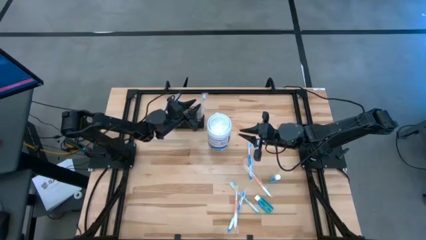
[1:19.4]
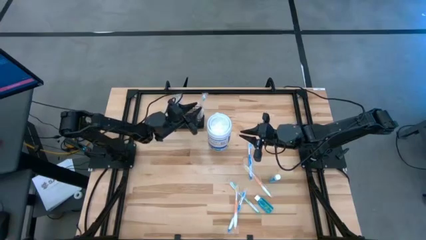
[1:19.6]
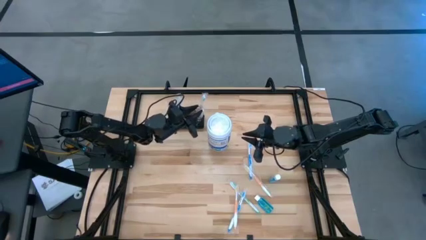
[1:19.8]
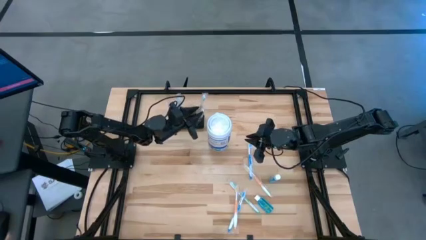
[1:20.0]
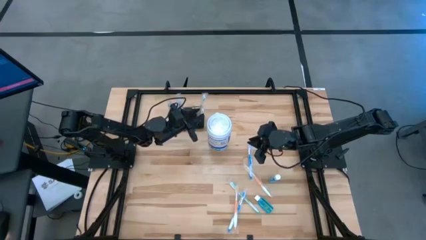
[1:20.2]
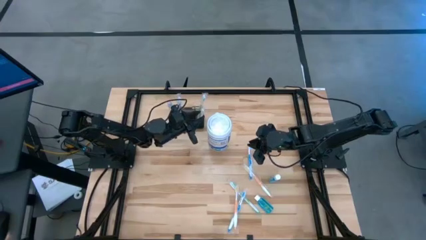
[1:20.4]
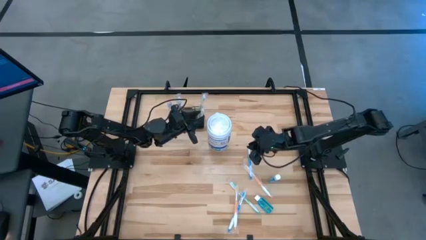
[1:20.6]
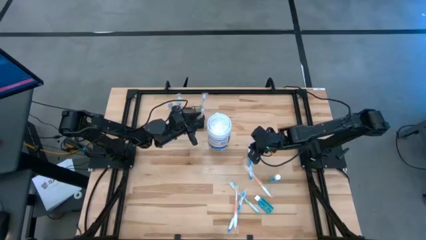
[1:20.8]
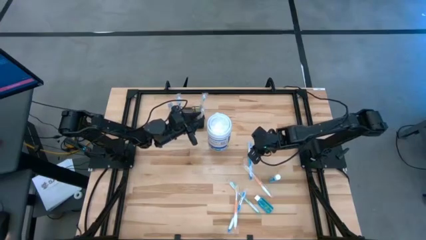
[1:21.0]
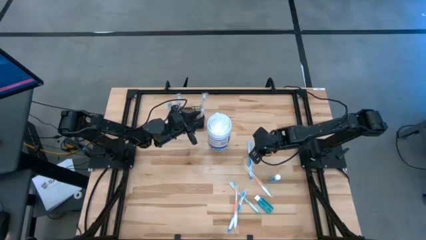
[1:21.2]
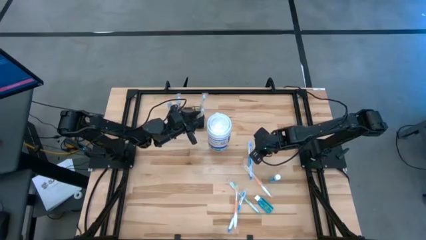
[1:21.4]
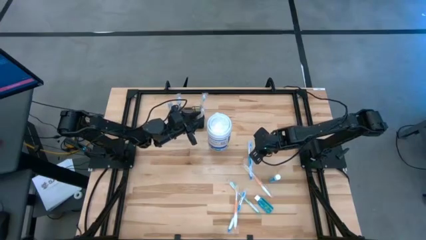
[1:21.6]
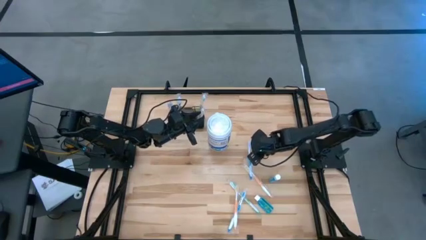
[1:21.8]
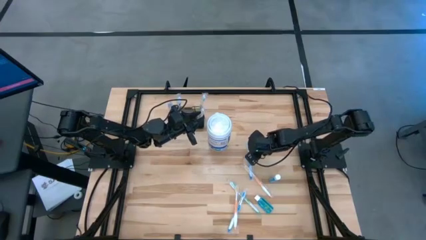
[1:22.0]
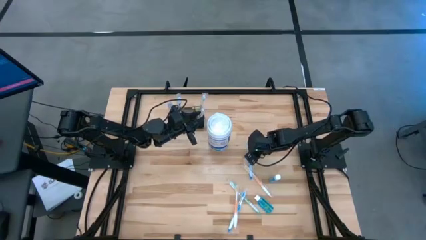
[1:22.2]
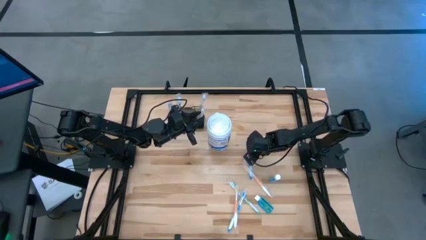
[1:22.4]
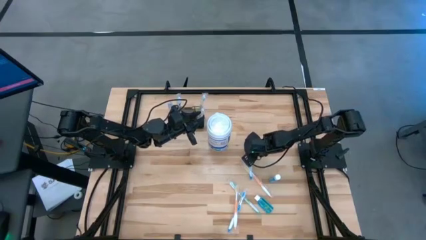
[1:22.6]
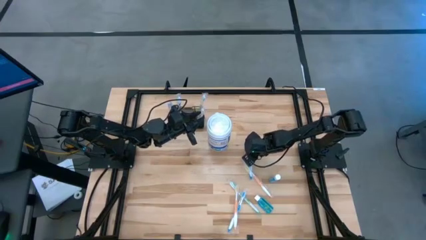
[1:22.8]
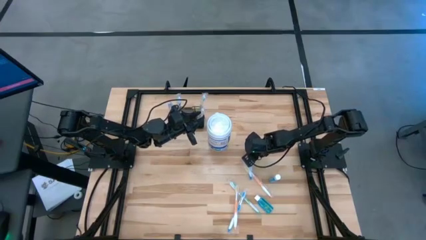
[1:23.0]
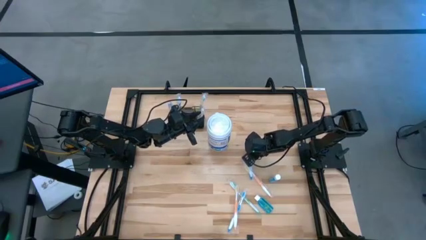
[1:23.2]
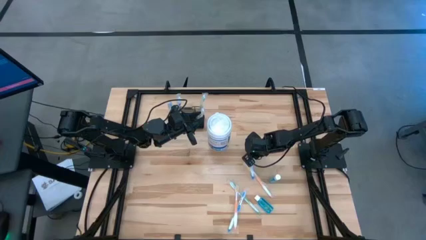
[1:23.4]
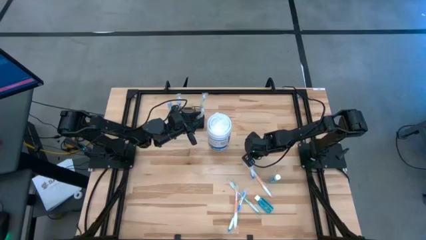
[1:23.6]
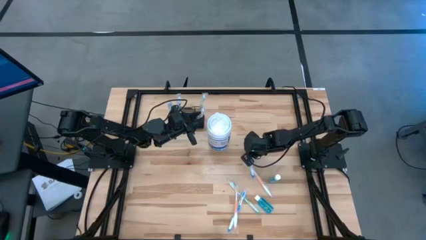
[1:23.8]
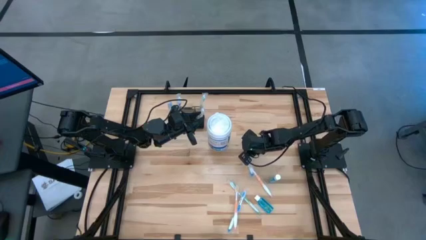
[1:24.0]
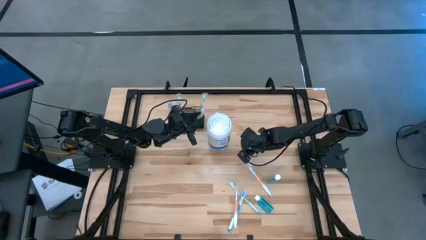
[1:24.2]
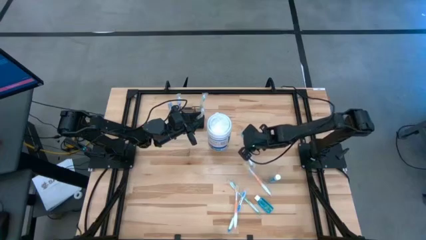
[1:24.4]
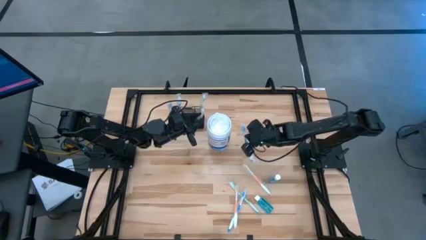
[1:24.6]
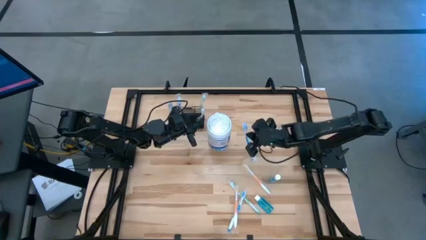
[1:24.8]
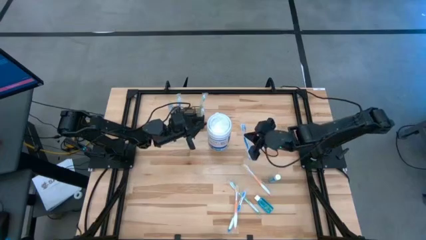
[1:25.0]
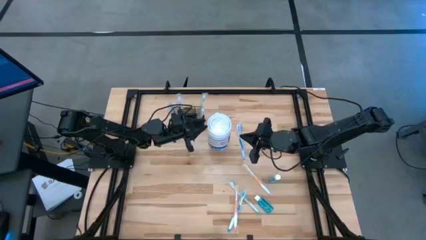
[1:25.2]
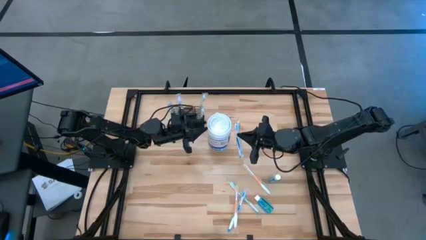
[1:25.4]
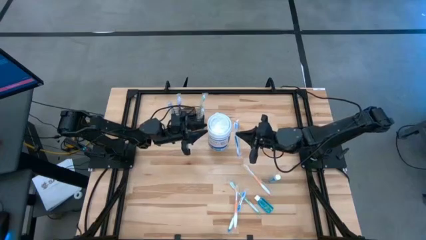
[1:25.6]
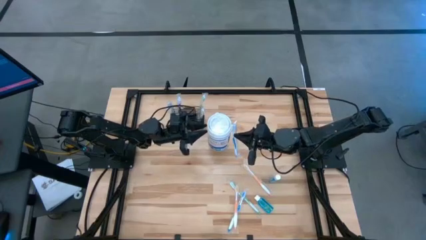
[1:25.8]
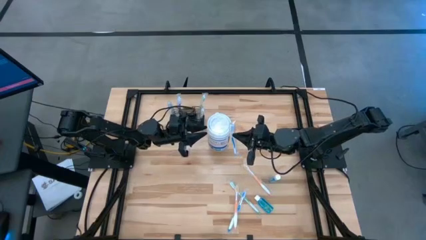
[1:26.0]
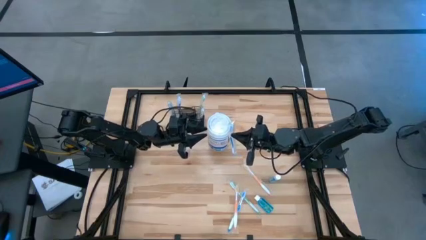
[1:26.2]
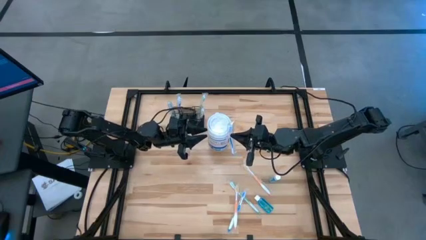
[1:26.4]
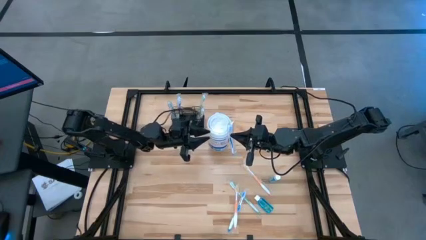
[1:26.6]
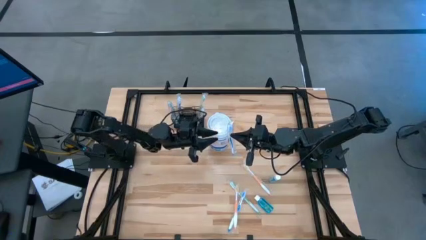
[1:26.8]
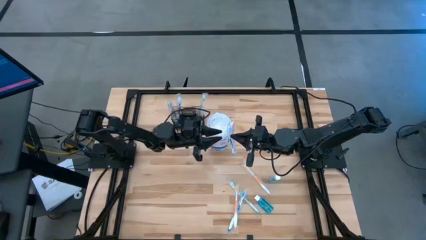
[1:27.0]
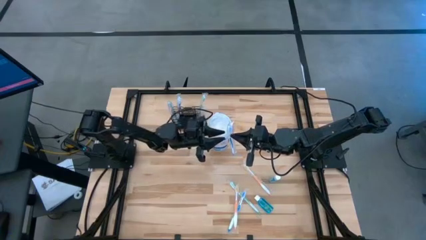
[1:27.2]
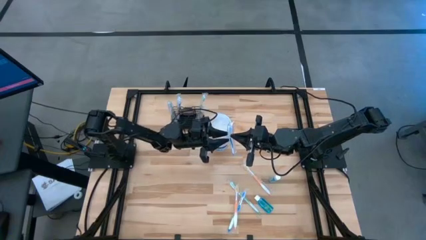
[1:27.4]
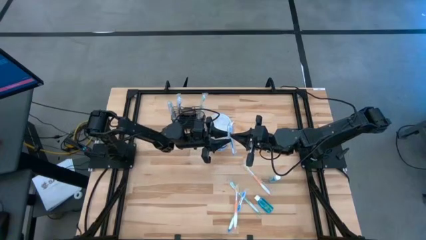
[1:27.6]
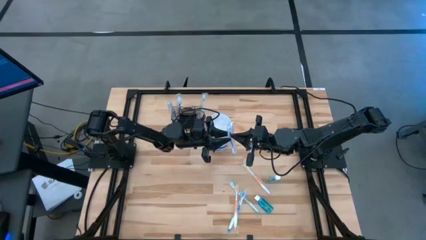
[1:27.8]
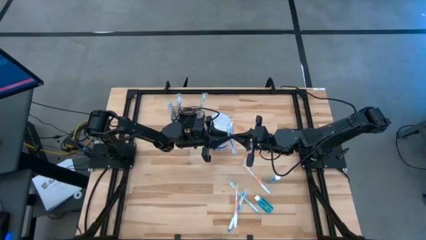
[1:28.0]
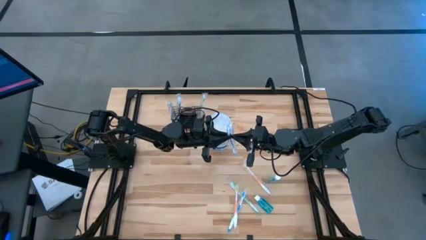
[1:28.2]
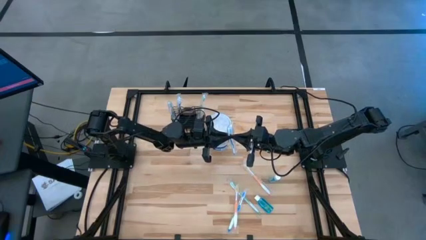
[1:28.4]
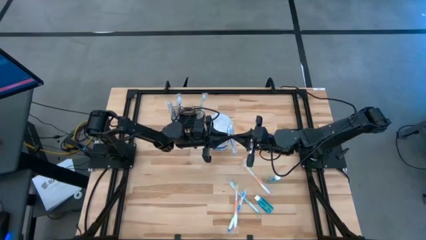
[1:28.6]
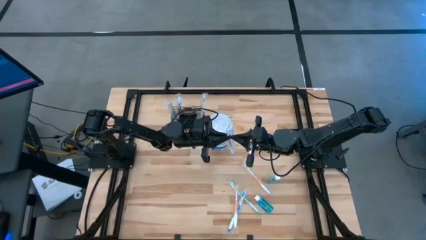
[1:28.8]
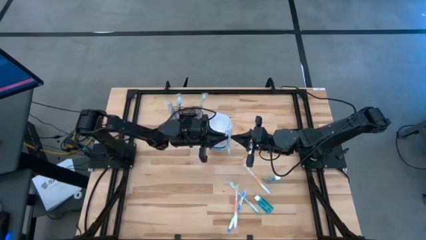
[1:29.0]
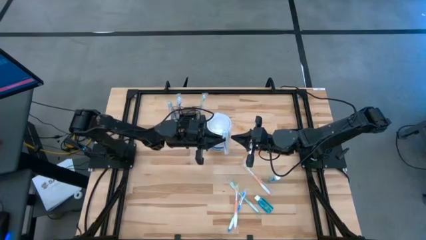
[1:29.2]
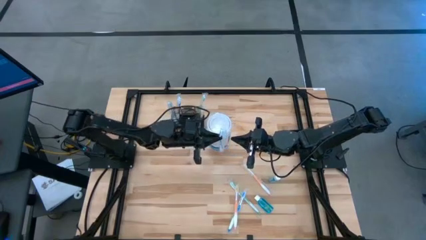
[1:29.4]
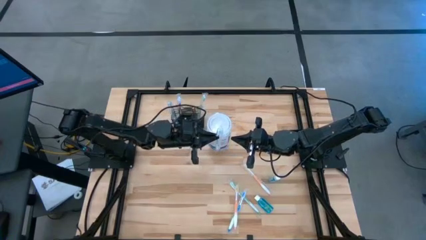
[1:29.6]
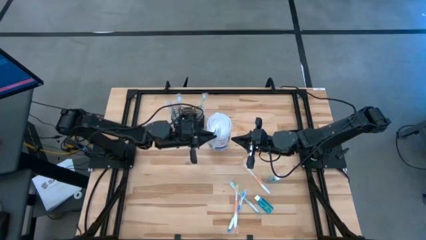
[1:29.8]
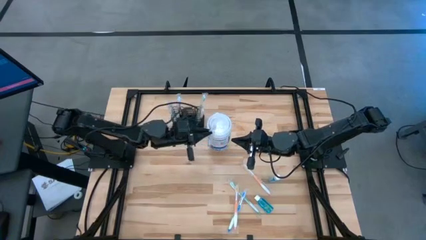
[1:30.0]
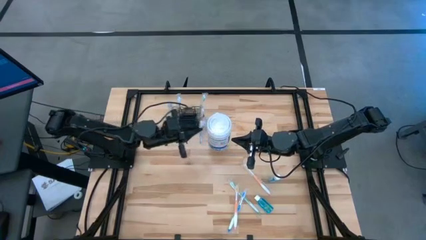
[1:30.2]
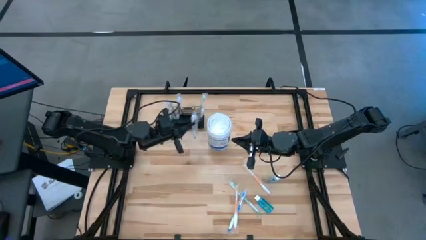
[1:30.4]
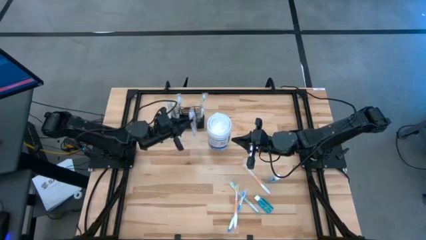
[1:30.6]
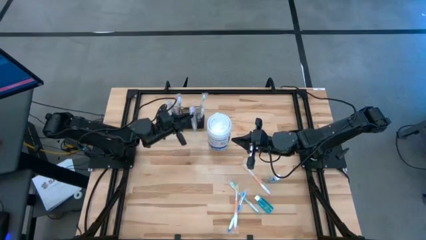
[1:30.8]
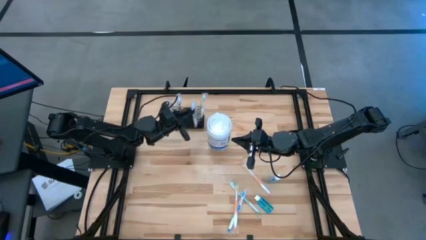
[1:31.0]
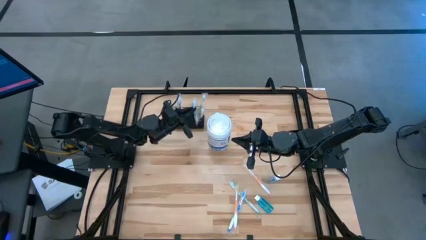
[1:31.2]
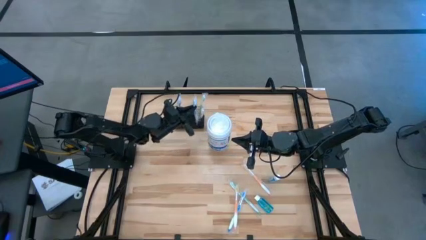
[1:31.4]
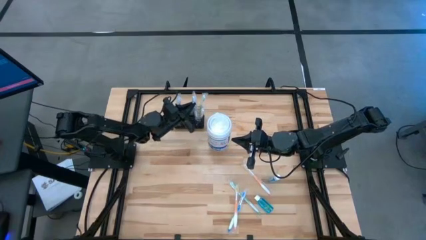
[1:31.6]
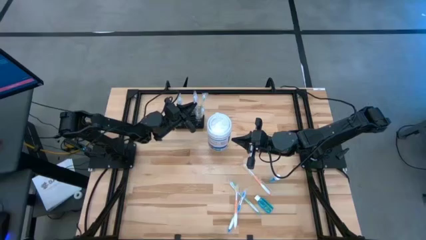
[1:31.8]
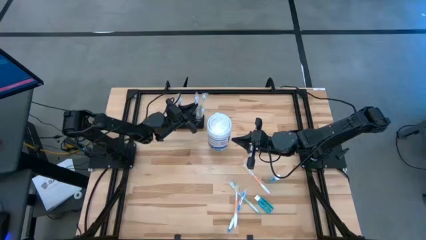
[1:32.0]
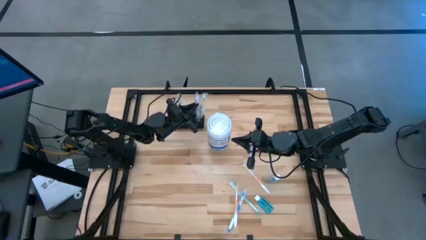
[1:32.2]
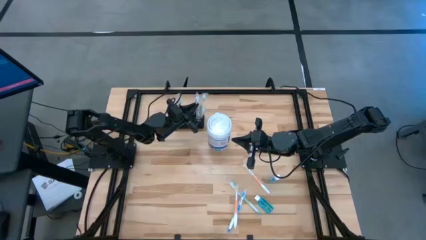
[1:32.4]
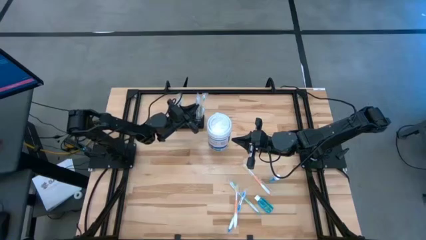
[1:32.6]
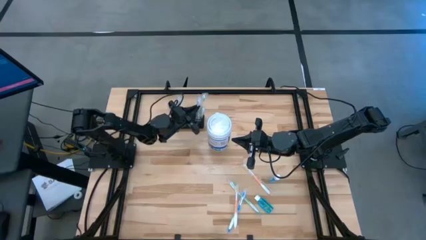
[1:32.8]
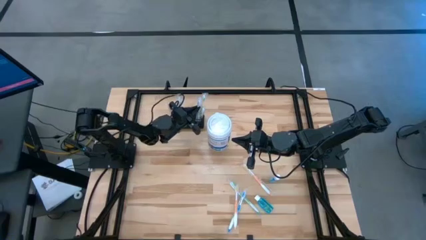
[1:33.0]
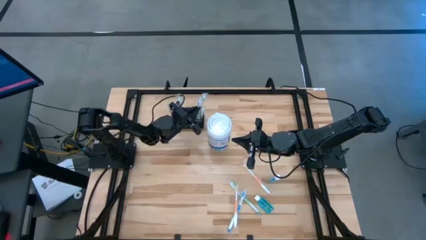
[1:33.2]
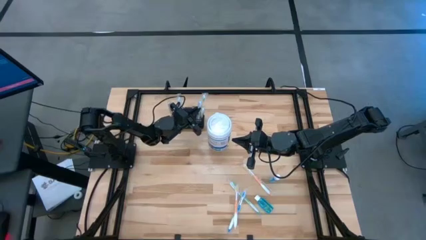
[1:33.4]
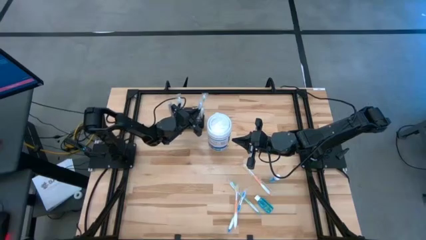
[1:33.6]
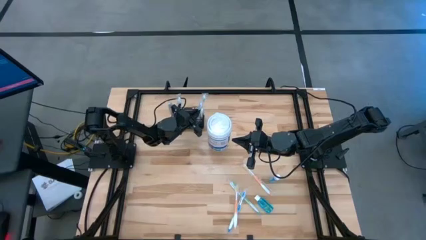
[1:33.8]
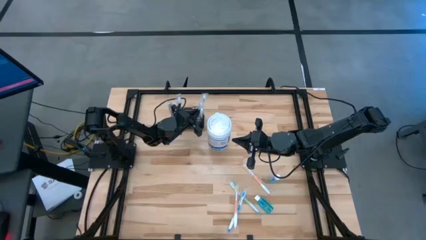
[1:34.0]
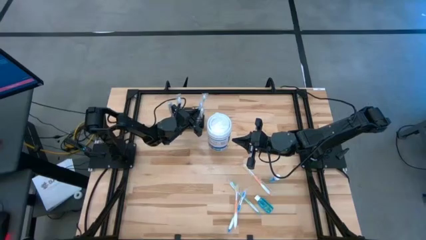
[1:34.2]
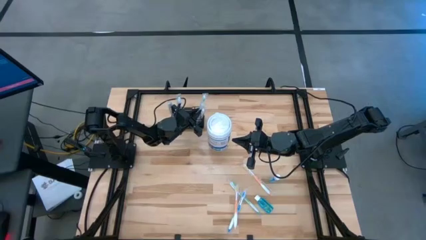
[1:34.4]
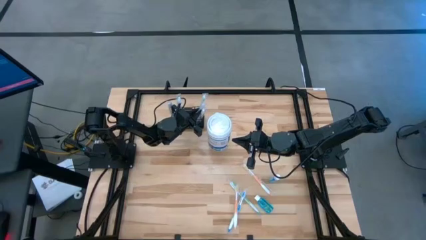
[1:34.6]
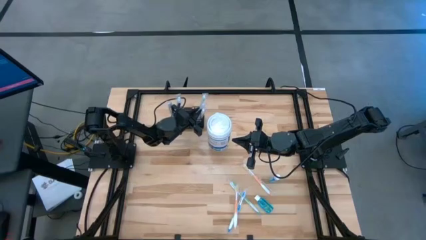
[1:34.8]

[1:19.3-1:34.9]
Task: Pick & Place toothbrushing station
Put the top blue toothbrush into the mesh organizer

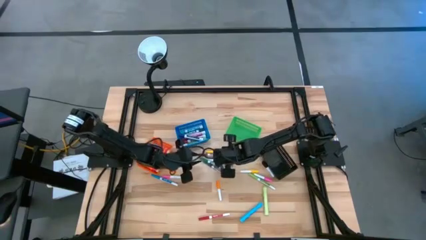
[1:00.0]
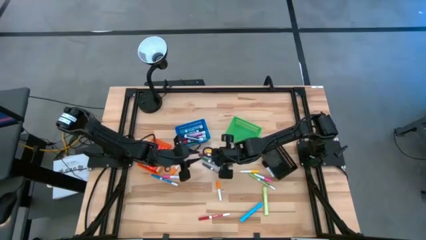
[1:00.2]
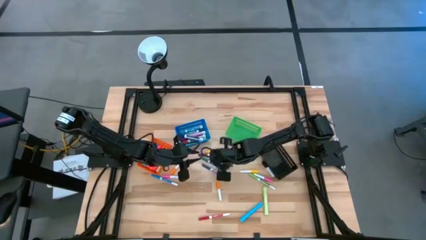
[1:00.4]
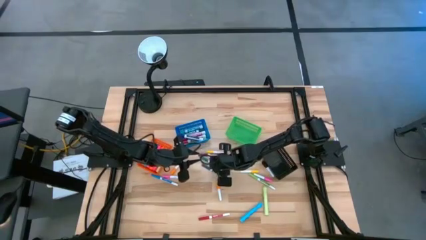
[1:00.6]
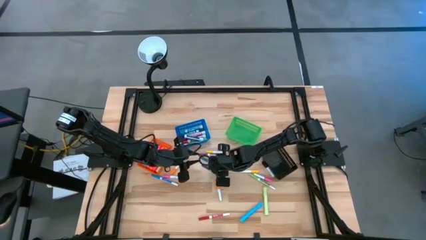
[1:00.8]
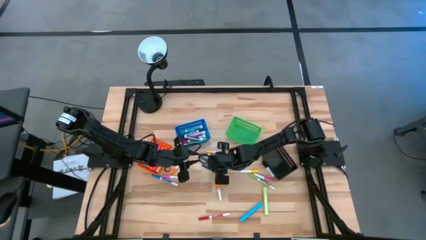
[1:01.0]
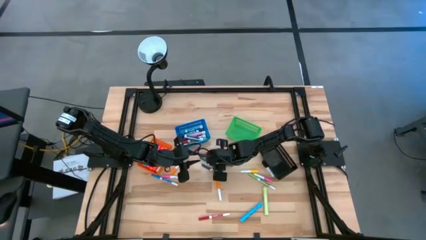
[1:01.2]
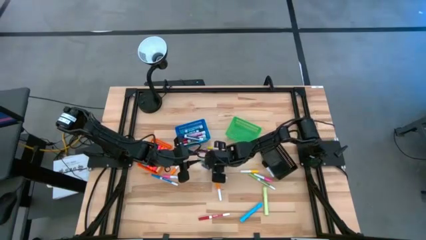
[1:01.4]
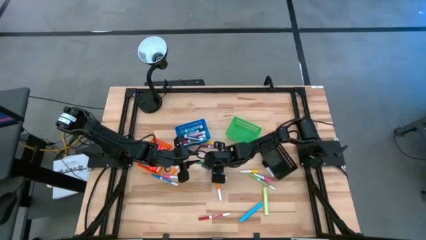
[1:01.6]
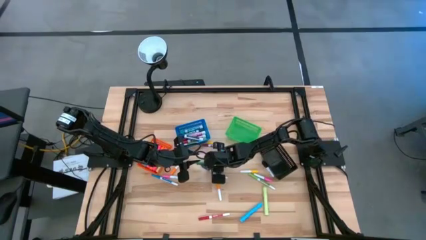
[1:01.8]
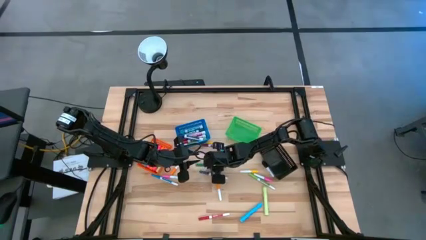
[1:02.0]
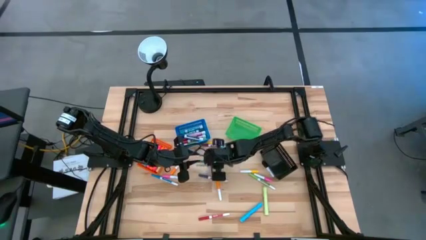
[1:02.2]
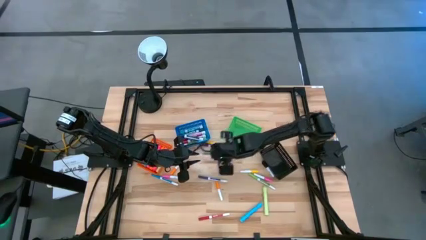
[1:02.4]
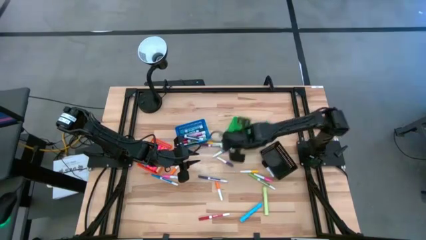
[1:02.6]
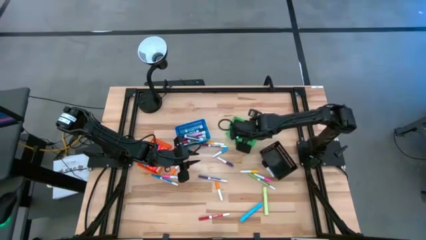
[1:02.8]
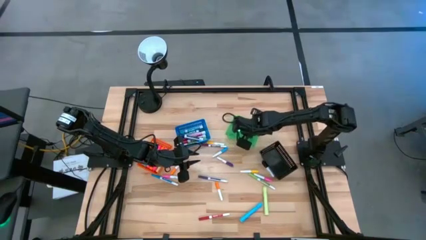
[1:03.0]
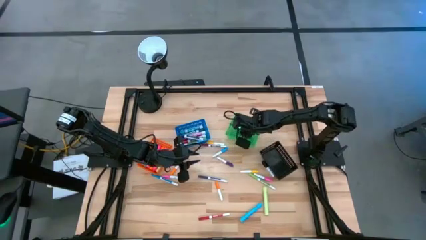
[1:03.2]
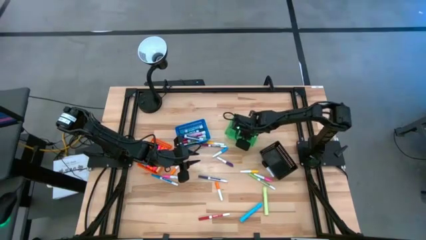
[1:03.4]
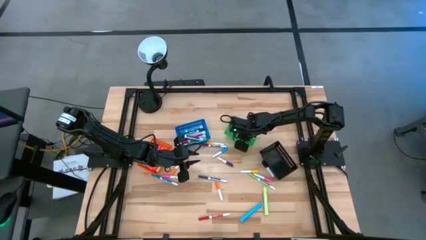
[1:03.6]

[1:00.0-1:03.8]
Task: Pick & Place Markers
Put the large dark green marker pen into the green basket
